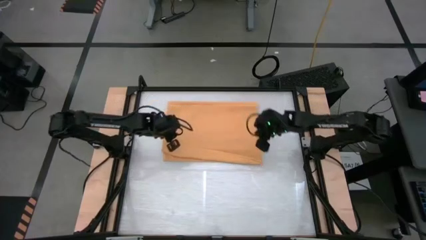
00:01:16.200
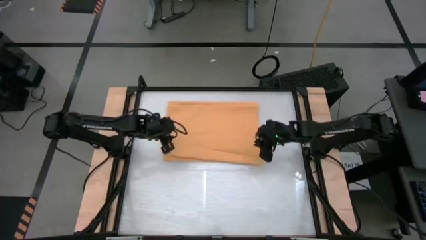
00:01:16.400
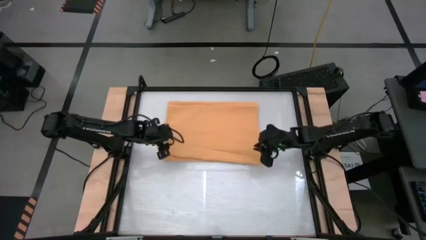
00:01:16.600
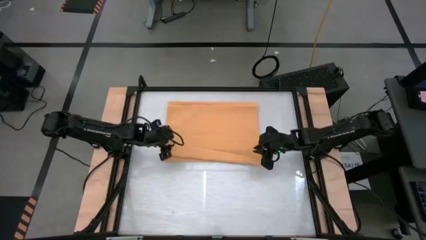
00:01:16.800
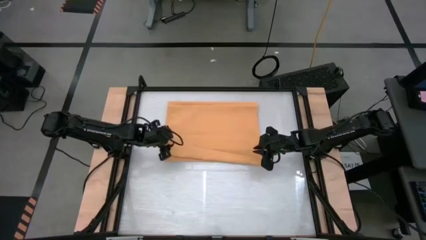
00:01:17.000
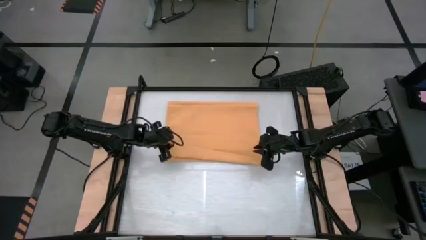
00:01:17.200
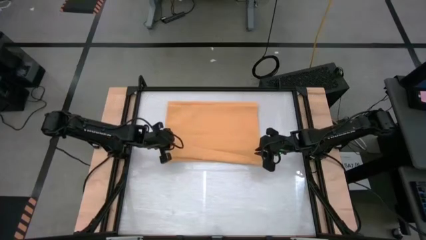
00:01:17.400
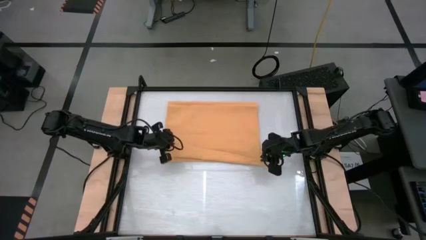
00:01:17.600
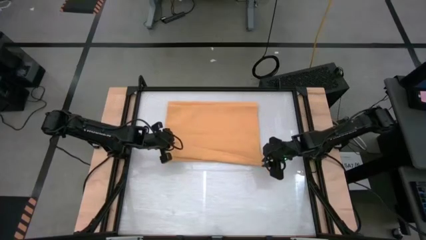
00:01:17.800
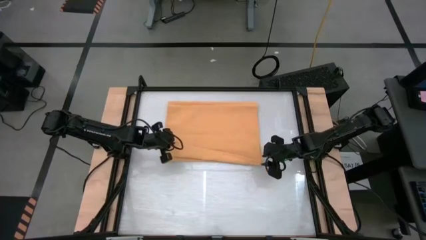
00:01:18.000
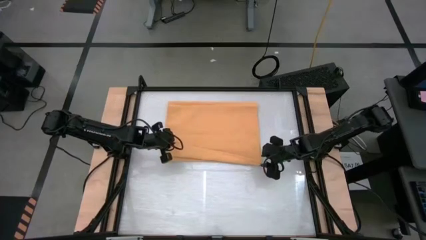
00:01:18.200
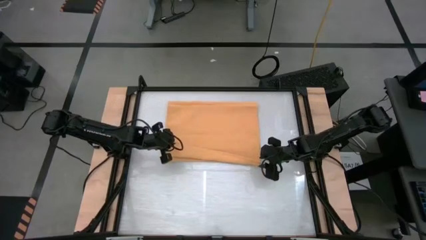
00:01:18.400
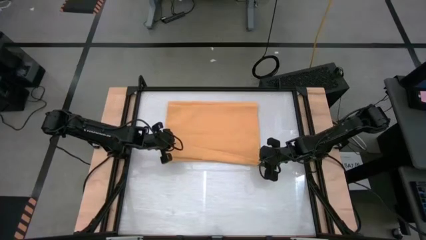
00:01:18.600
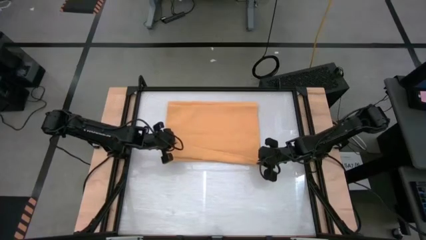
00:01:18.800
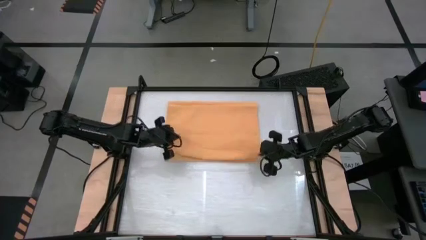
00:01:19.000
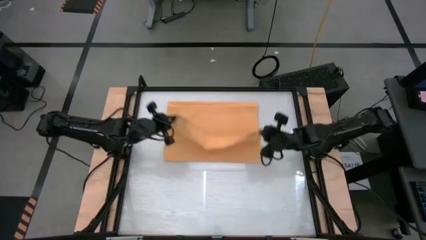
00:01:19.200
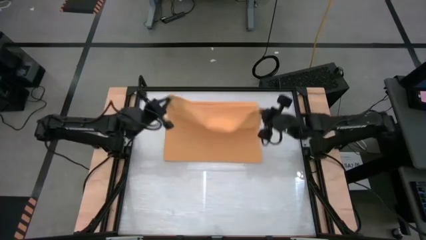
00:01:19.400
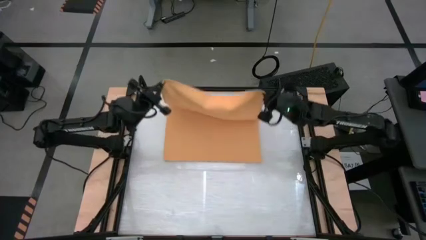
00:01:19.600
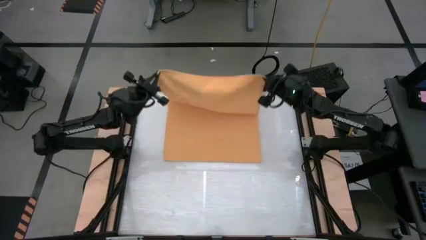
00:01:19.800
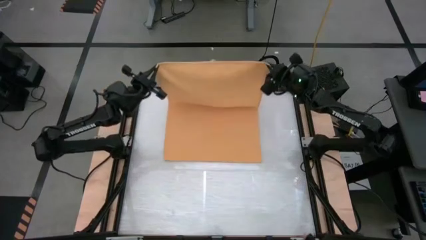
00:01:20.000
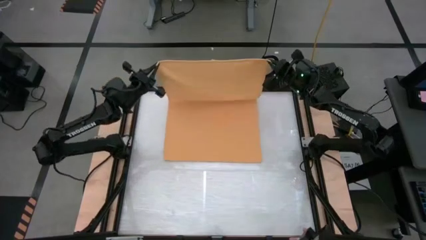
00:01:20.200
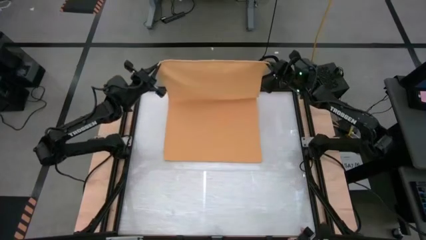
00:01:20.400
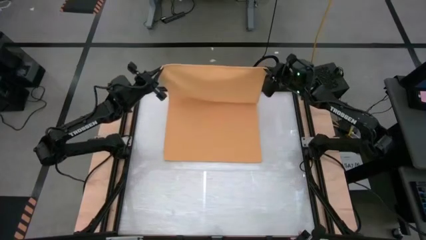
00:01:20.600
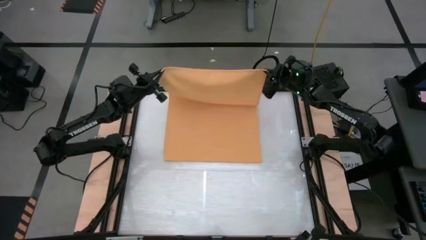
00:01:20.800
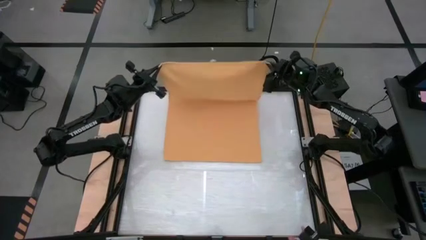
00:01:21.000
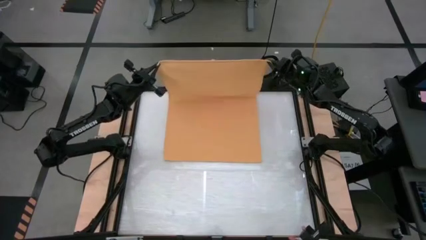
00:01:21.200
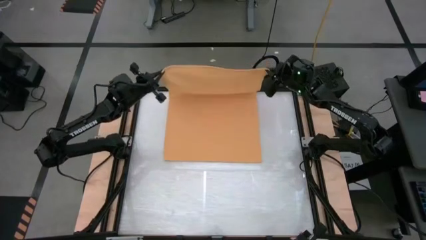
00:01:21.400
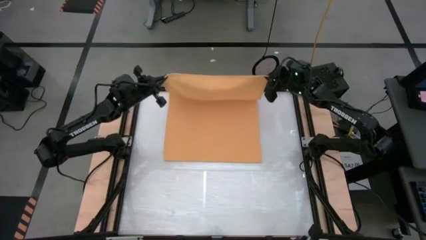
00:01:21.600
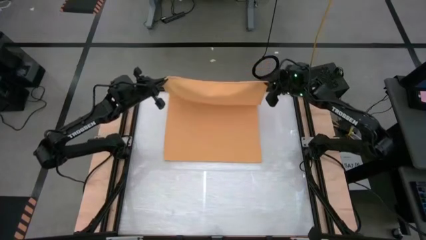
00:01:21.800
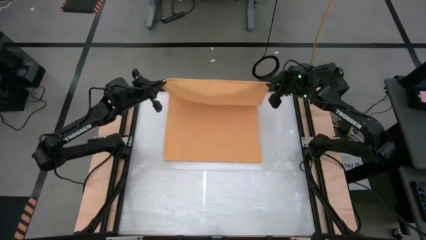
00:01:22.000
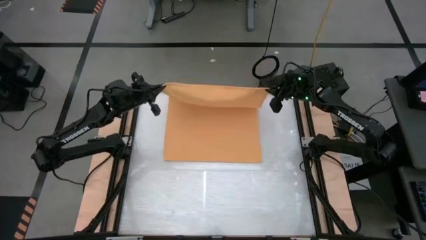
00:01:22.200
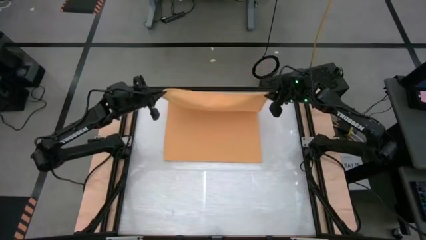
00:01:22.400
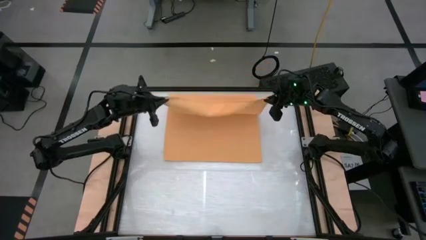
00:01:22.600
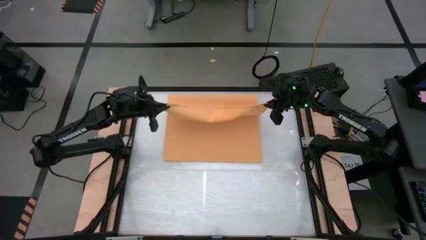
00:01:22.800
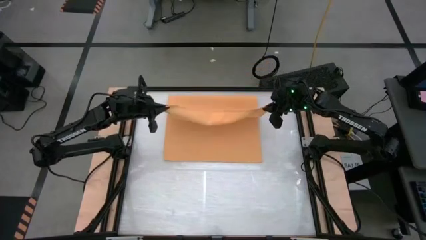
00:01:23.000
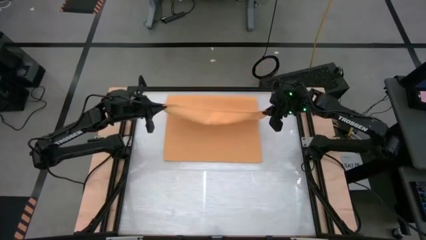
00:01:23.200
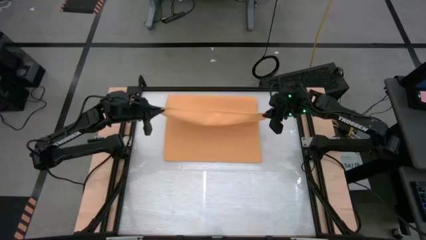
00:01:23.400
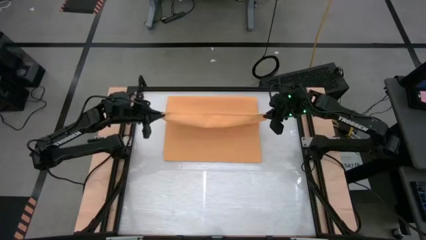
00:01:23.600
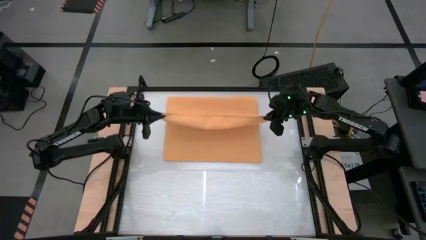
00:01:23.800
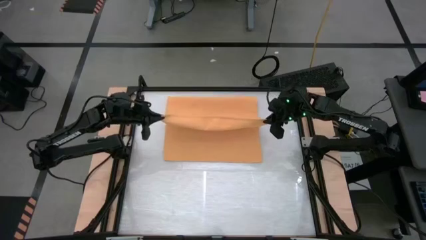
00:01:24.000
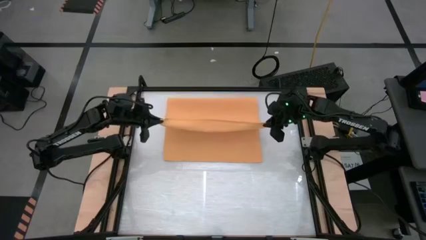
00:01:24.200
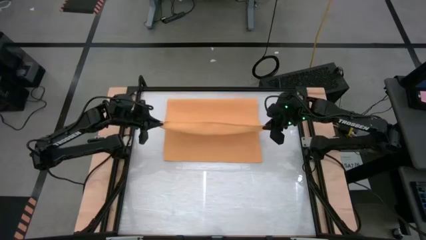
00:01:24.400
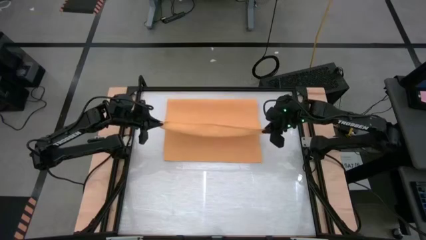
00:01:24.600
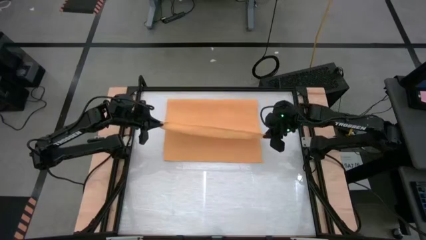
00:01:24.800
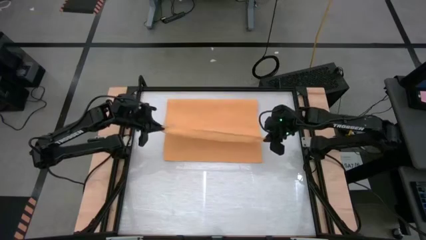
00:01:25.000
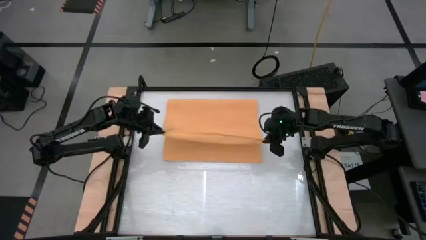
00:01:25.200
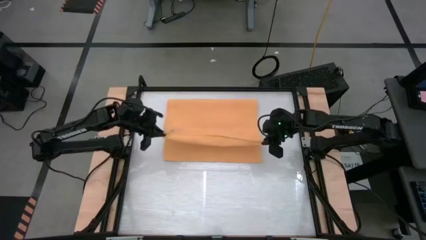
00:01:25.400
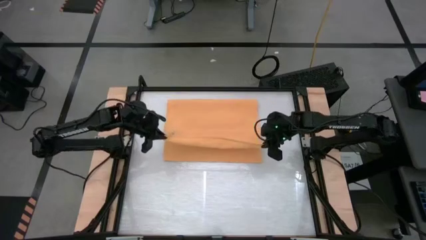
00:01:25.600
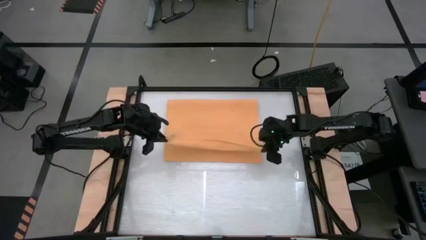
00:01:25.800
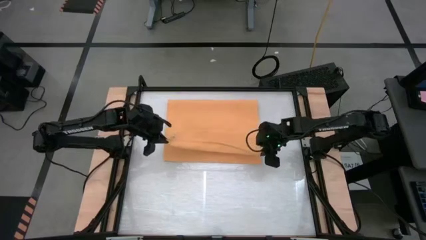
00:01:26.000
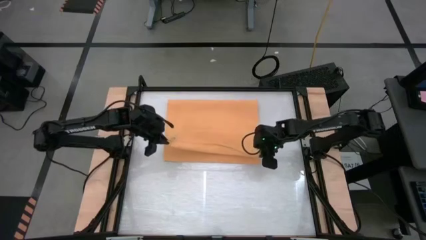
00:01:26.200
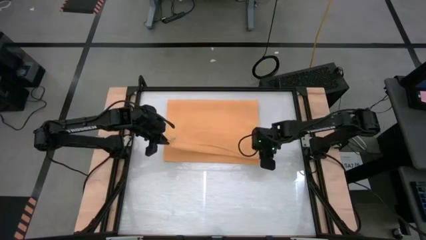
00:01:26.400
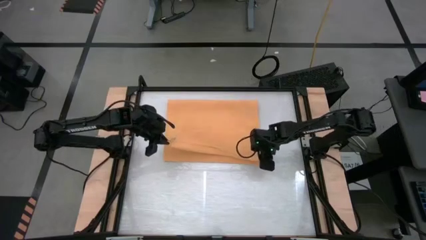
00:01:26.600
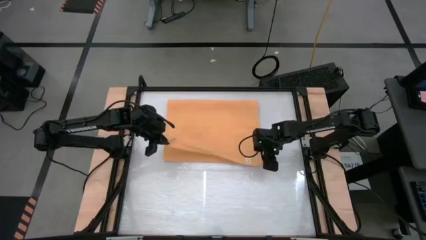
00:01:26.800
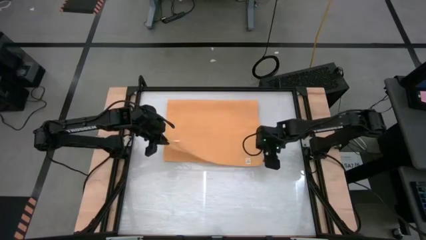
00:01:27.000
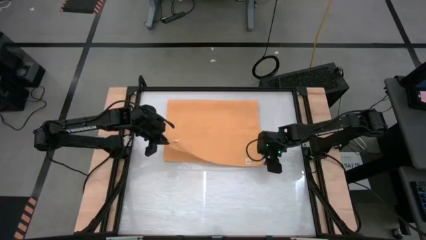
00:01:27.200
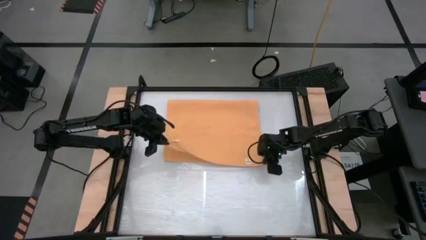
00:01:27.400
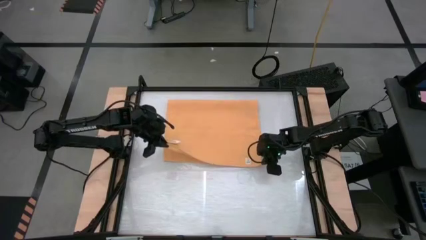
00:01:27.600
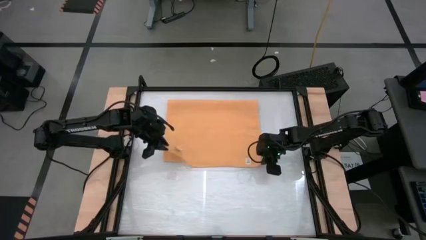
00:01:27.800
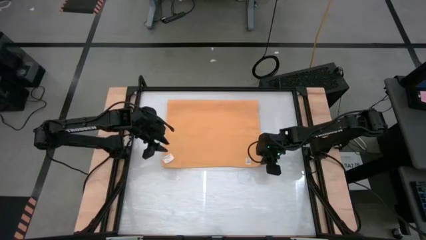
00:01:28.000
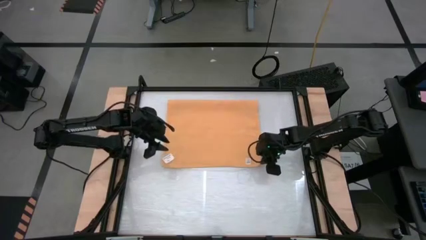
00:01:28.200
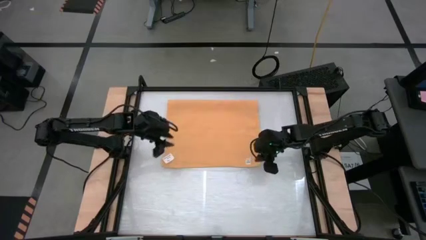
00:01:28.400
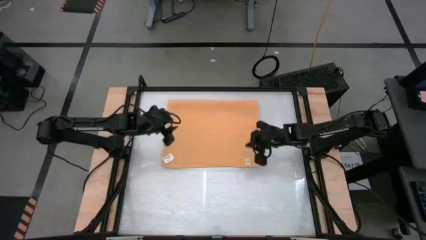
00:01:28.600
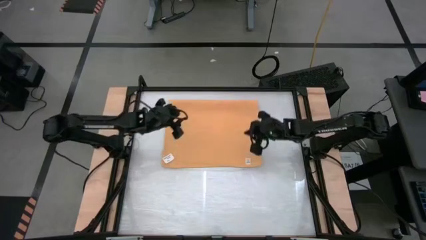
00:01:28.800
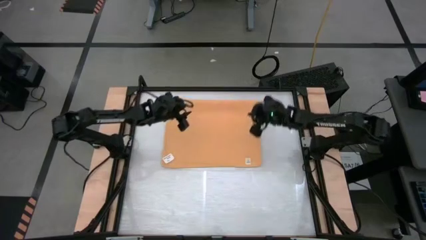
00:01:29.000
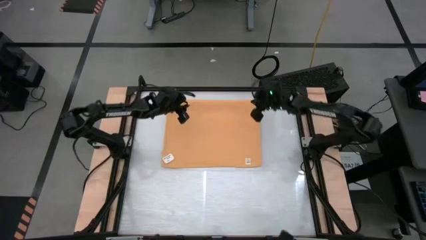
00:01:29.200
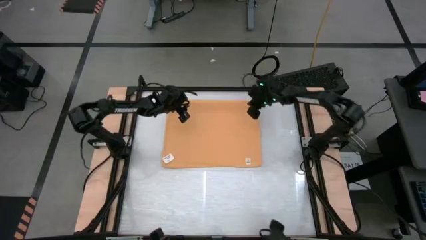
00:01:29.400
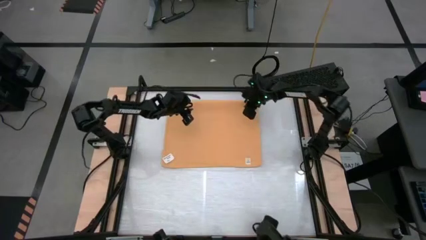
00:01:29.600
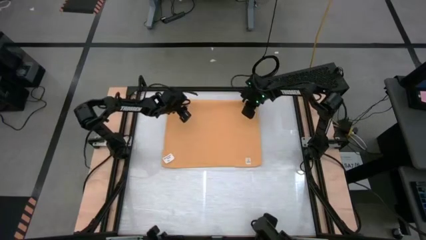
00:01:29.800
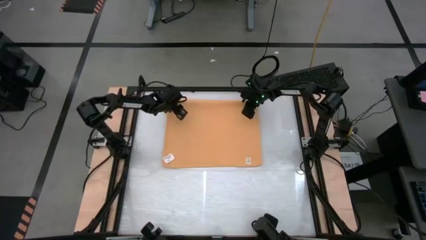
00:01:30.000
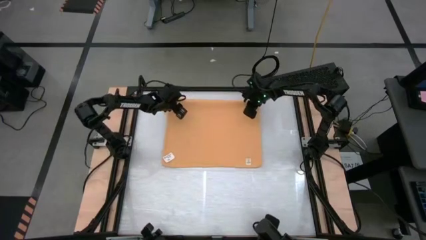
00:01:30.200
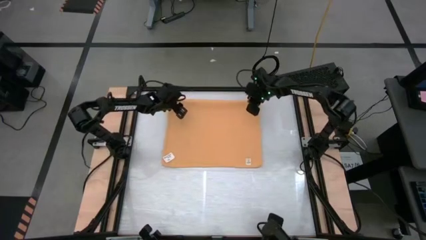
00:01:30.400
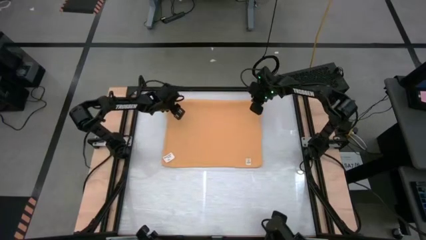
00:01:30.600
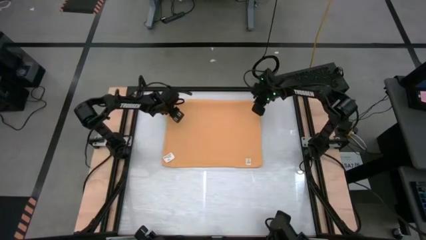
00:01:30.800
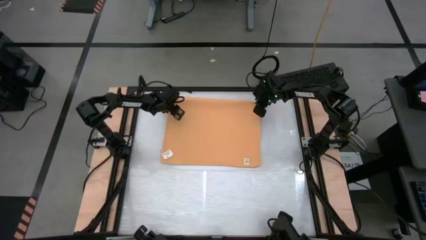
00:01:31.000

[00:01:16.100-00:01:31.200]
Task: Roll towel
Roll the yellow towel
